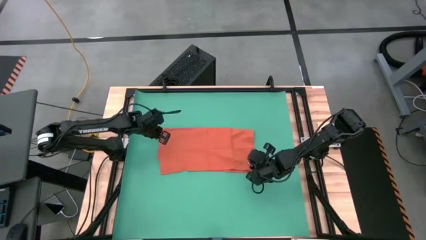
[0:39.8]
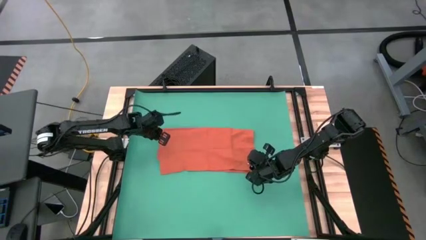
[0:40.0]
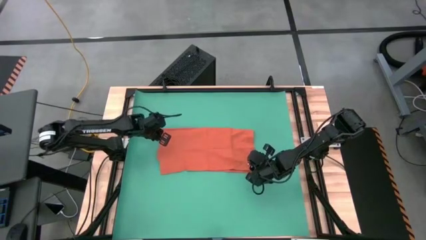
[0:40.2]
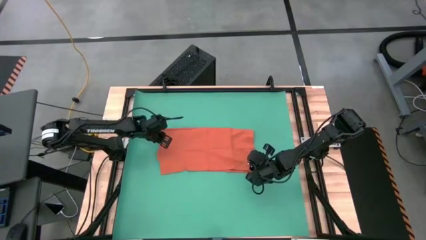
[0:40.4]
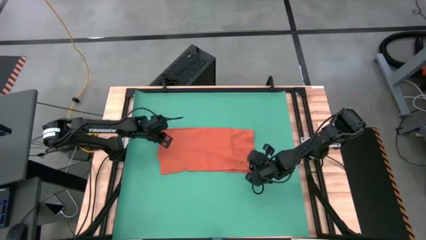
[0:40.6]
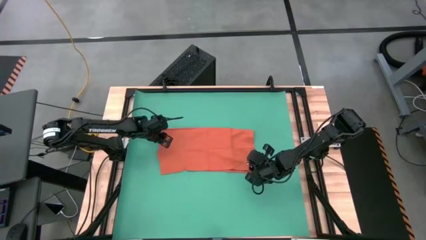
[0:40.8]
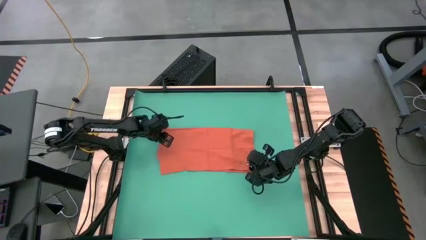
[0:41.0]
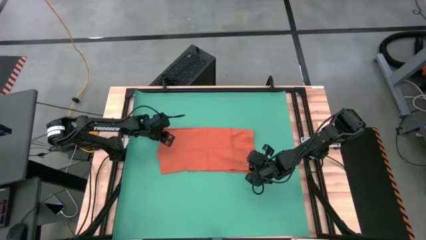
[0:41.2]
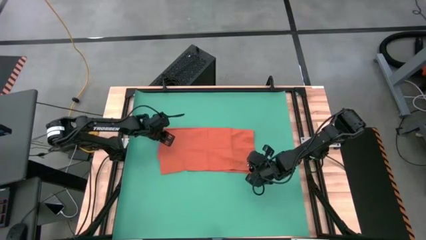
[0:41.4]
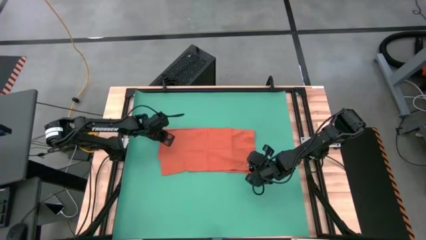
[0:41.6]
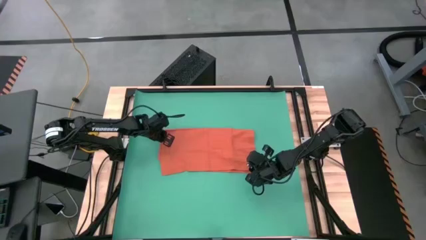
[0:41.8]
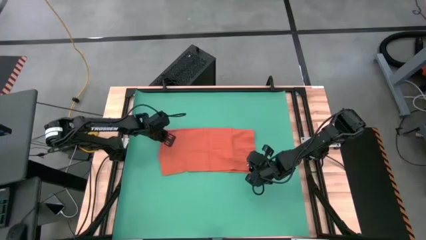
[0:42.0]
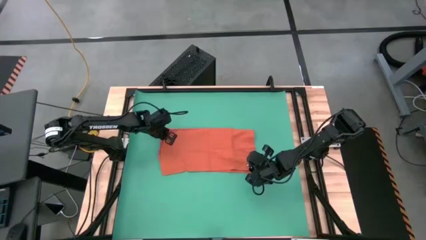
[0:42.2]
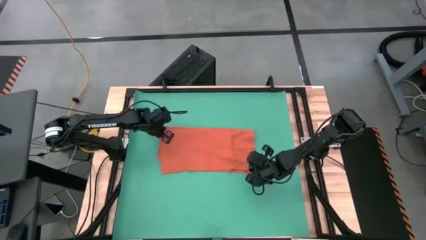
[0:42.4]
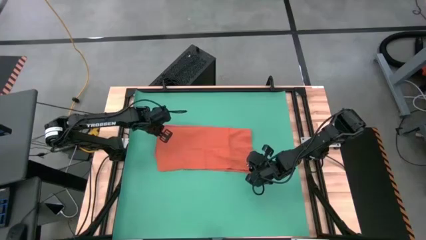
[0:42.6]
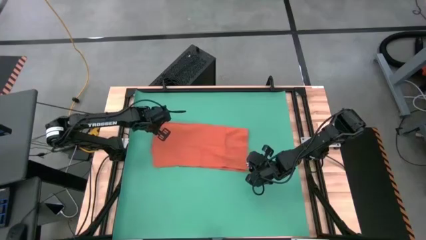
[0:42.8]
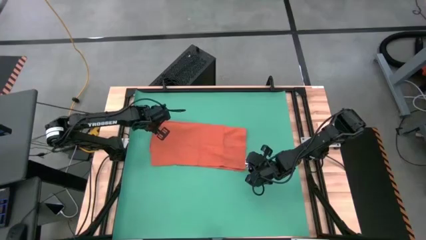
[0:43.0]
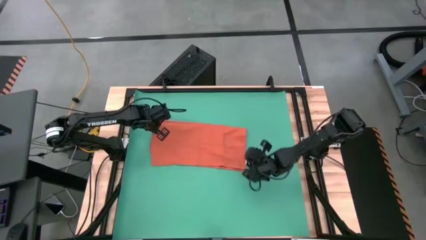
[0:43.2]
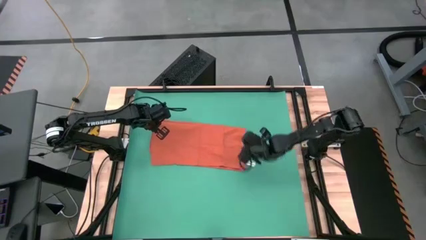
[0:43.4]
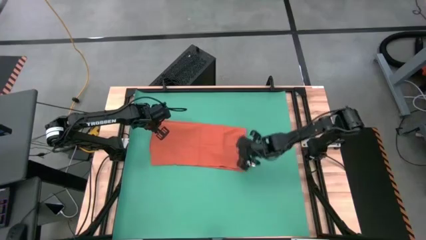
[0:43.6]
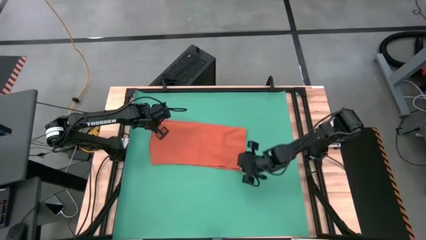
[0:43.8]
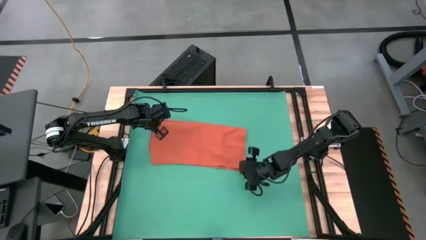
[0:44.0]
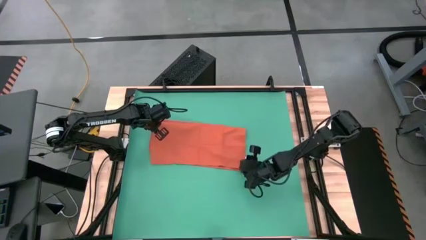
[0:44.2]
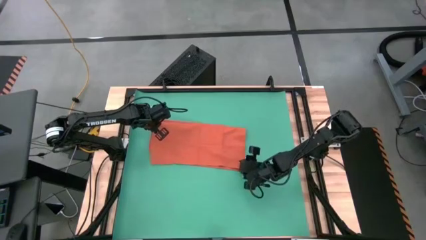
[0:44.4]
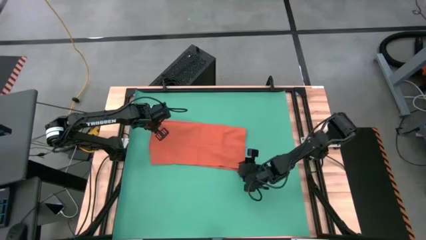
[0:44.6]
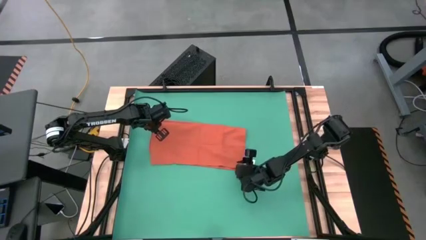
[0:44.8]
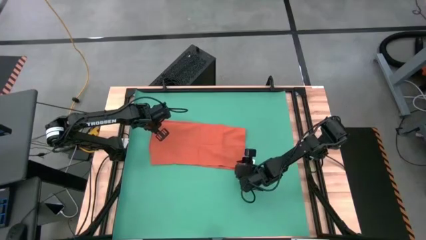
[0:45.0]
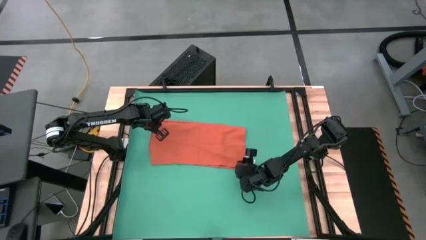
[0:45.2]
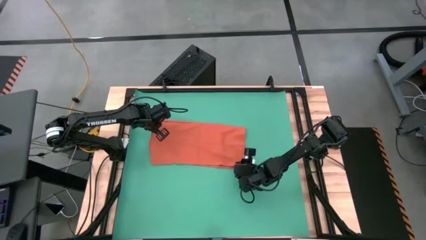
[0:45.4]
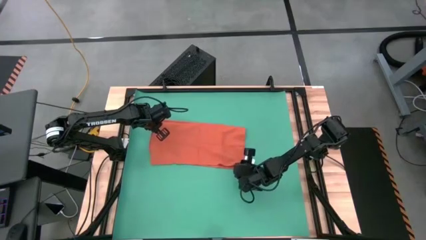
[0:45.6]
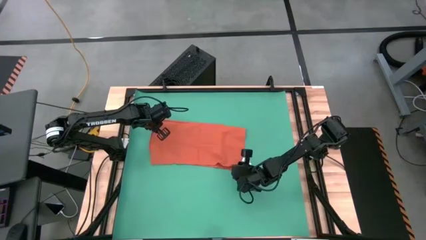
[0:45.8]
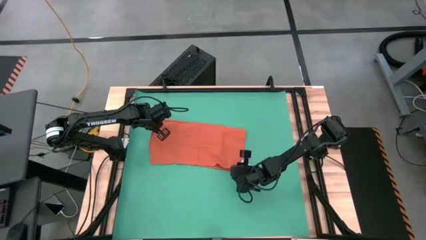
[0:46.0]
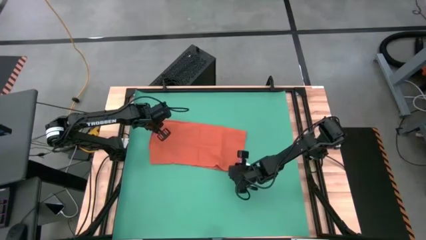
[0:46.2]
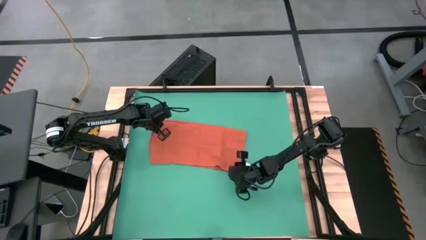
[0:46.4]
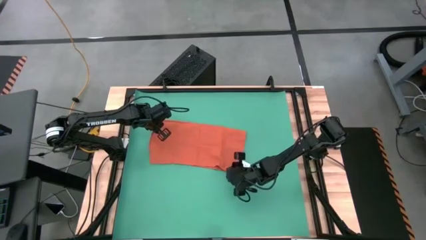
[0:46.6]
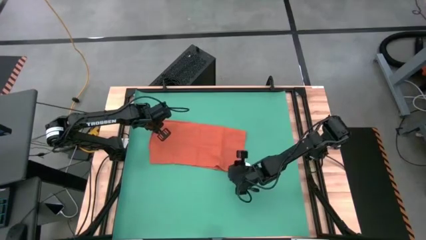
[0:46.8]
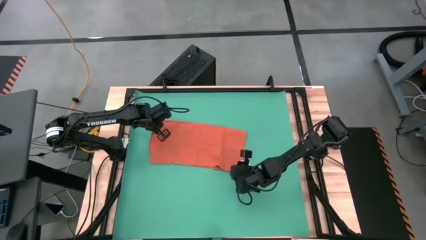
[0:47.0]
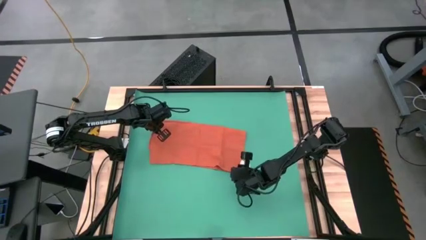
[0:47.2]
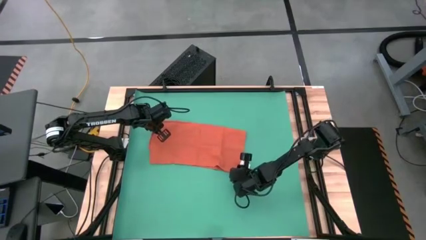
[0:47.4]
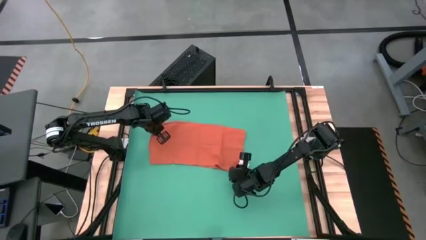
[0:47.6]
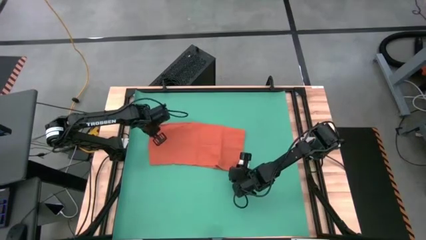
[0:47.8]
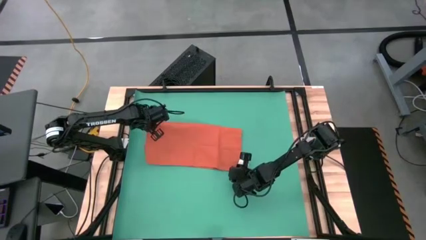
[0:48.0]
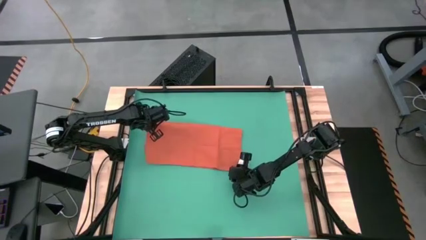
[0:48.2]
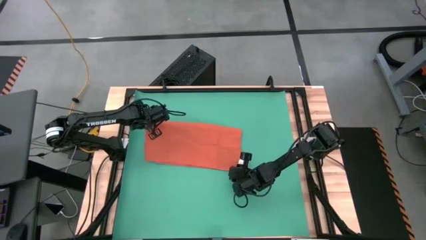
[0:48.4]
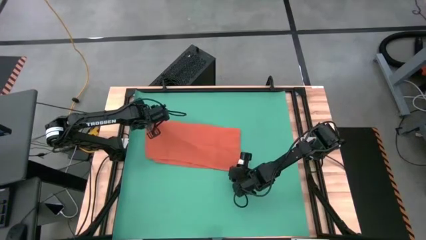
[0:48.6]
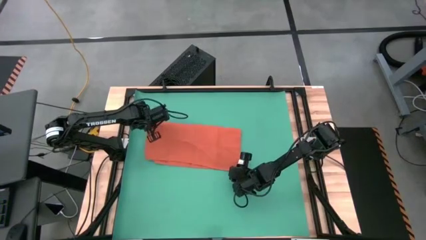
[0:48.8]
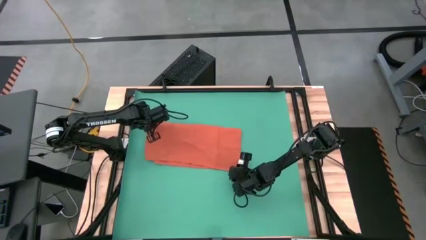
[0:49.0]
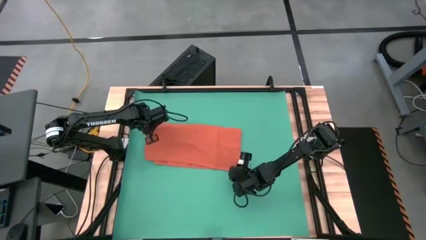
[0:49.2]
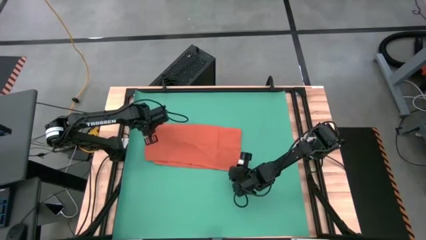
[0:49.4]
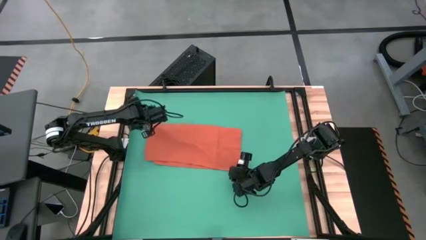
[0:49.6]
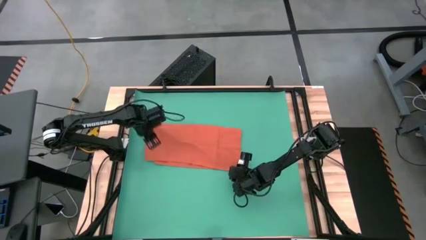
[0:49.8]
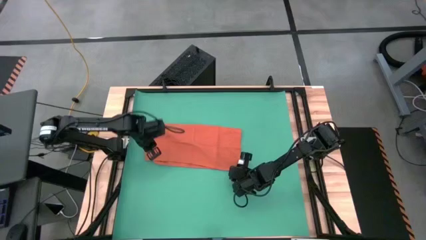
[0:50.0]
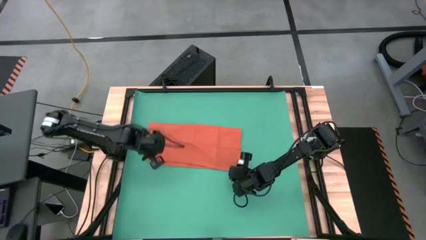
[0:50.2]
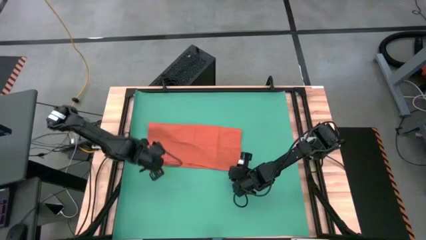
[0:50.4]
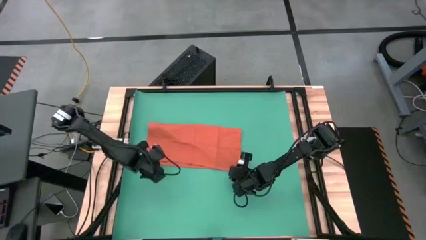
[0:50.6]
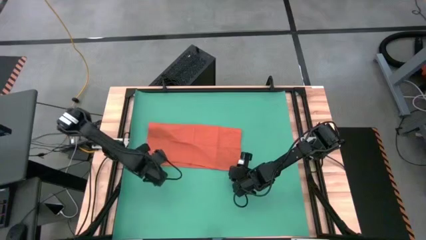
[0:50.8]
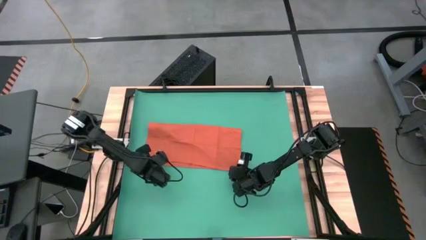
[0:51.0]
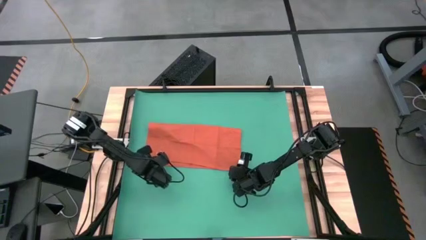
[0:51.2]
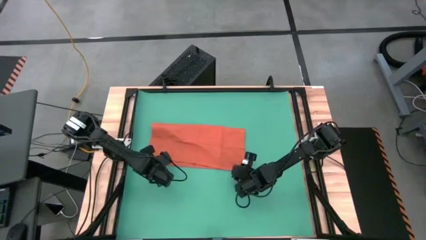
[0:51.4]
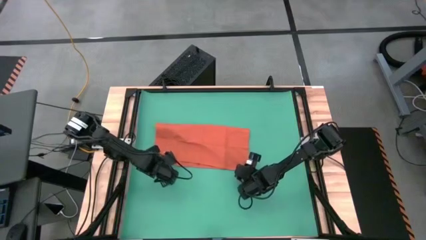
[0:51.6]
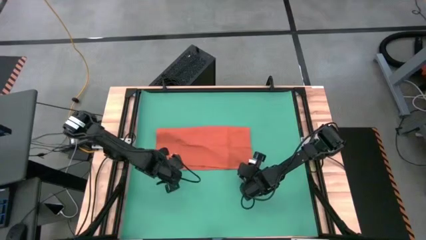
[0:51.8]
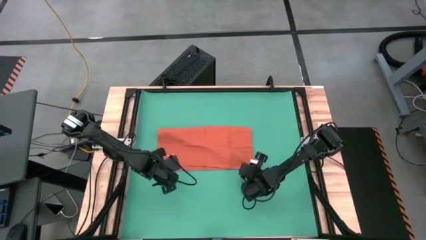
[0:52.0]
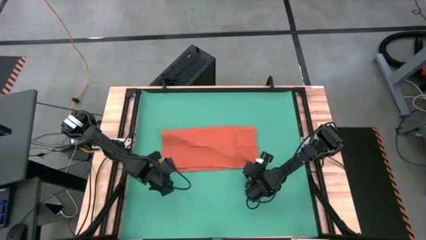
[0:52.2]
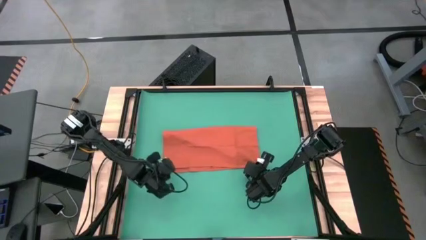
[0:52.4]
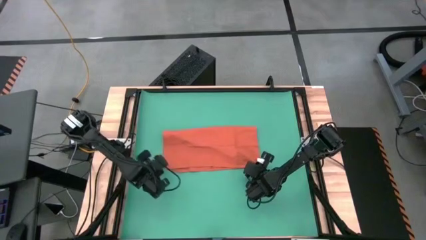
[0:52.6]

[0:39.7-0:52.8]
Task: Roll towel
Fold the orange towel
